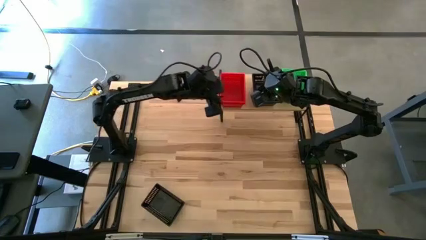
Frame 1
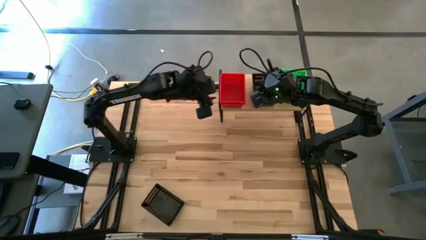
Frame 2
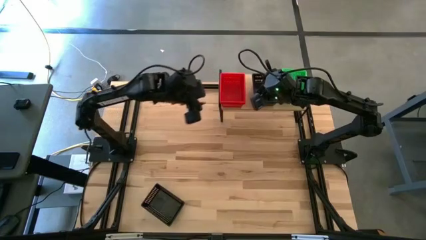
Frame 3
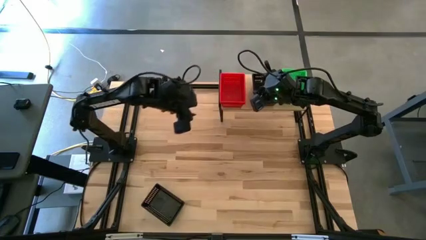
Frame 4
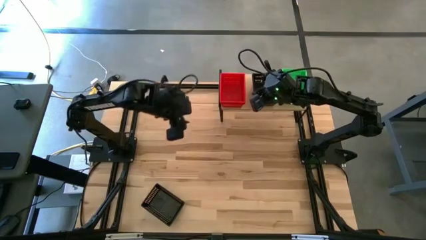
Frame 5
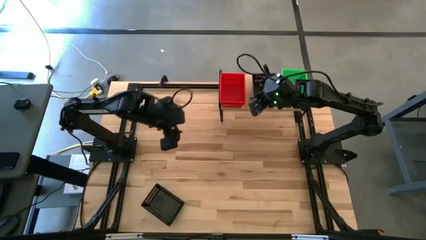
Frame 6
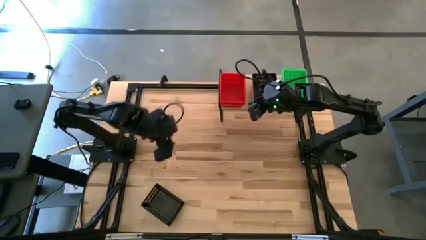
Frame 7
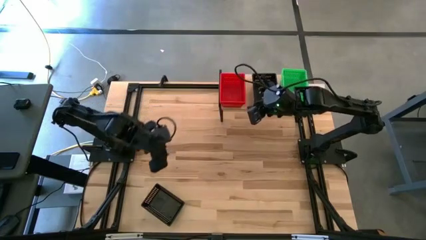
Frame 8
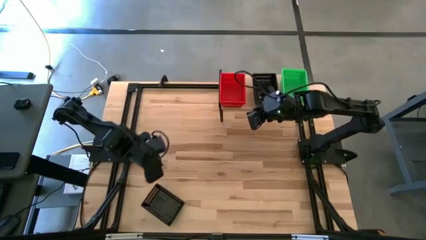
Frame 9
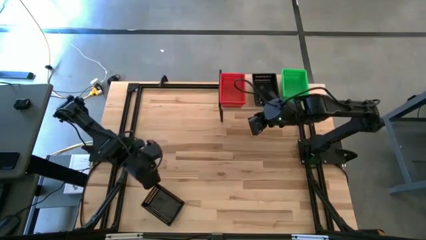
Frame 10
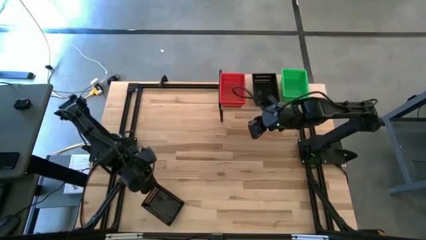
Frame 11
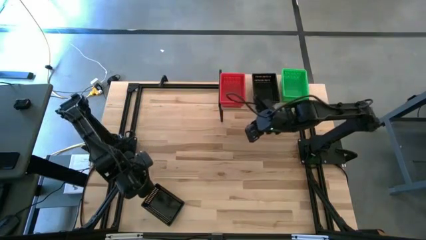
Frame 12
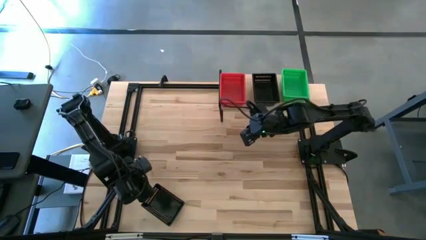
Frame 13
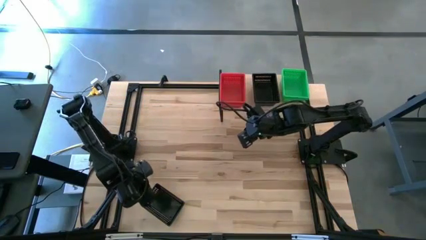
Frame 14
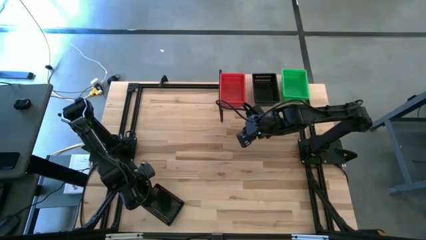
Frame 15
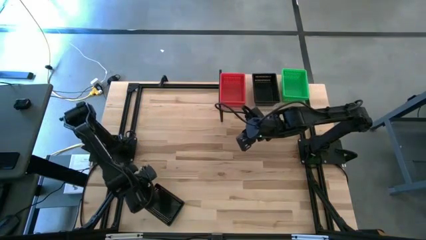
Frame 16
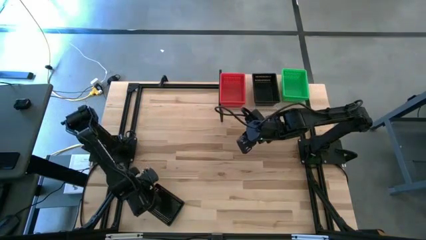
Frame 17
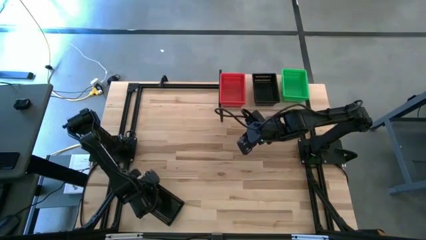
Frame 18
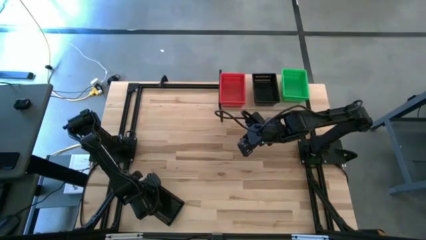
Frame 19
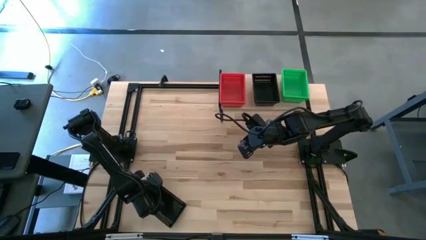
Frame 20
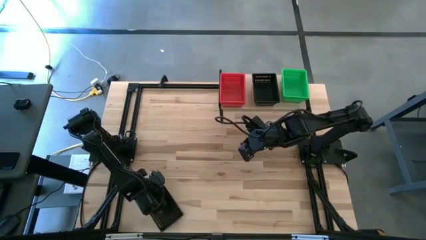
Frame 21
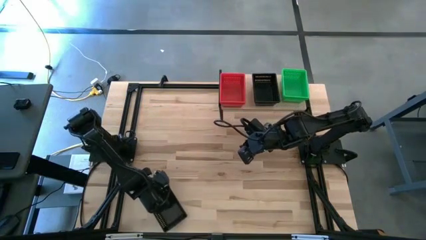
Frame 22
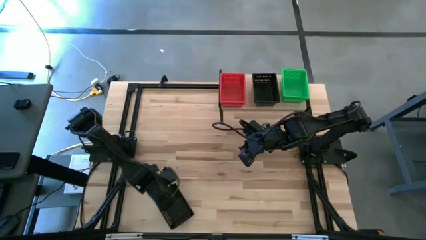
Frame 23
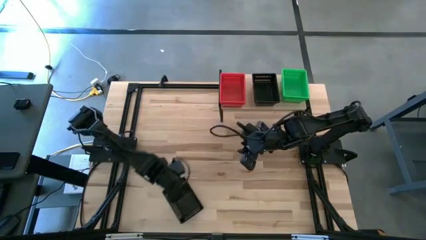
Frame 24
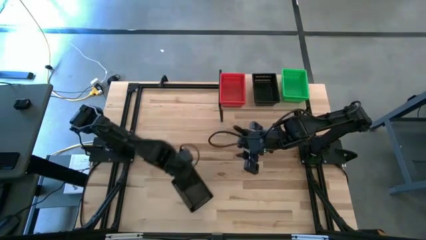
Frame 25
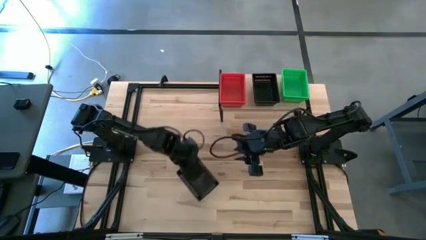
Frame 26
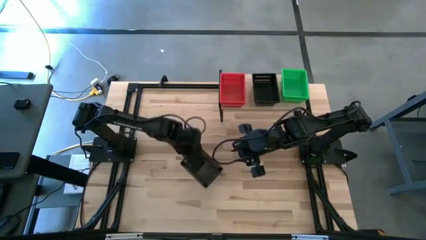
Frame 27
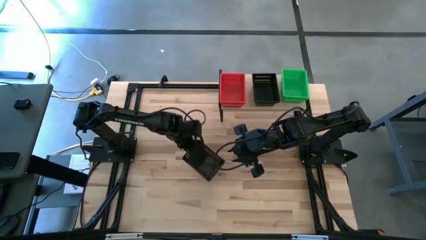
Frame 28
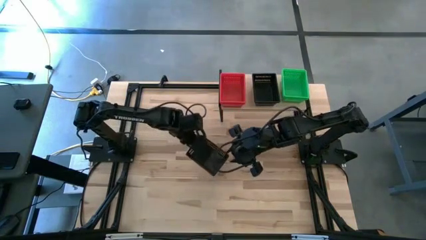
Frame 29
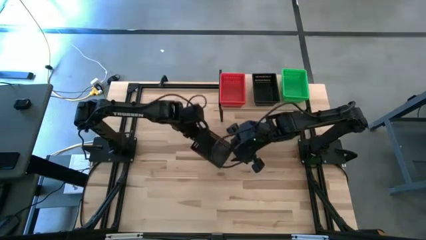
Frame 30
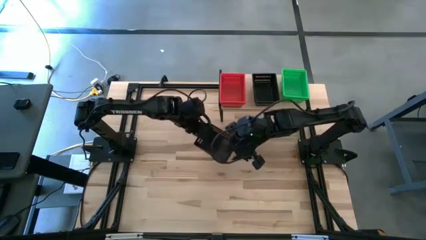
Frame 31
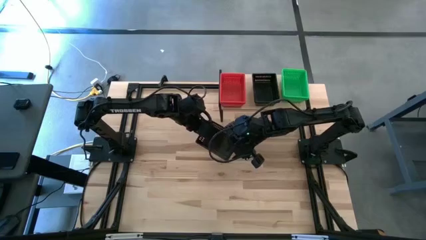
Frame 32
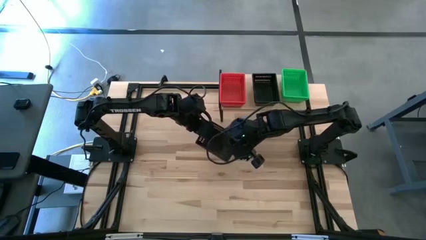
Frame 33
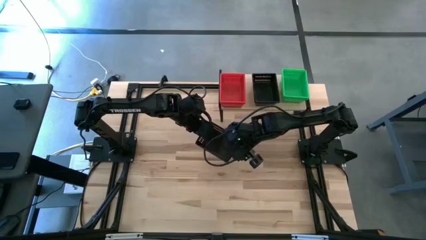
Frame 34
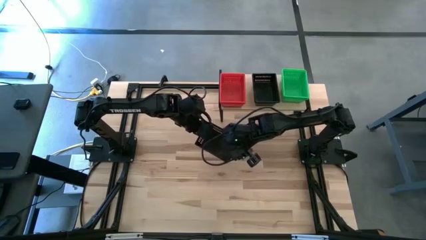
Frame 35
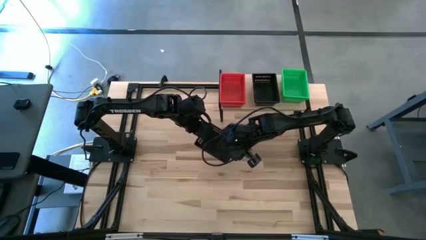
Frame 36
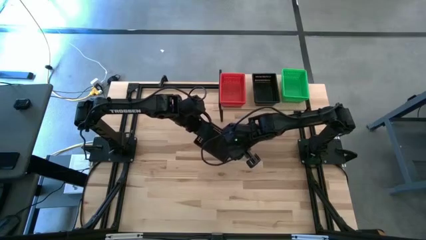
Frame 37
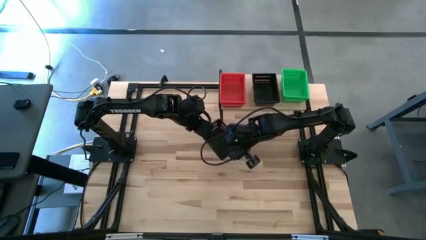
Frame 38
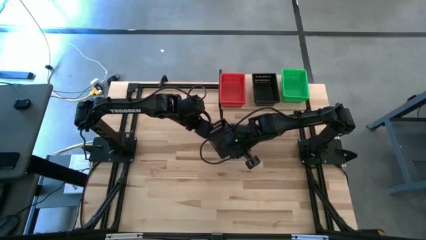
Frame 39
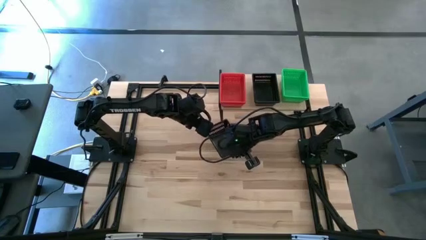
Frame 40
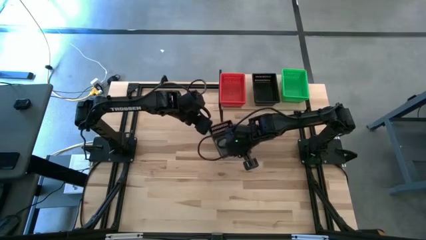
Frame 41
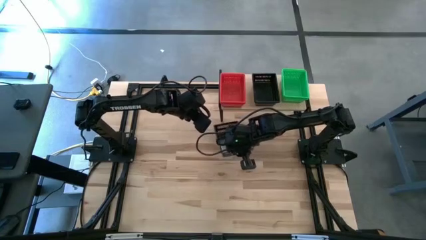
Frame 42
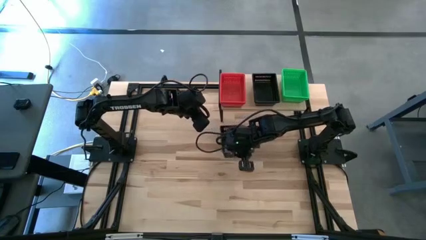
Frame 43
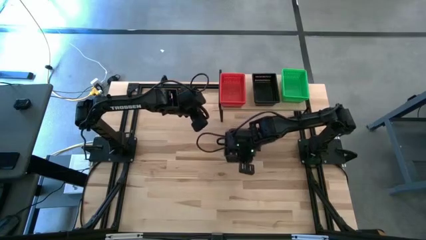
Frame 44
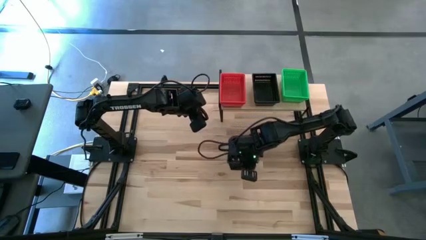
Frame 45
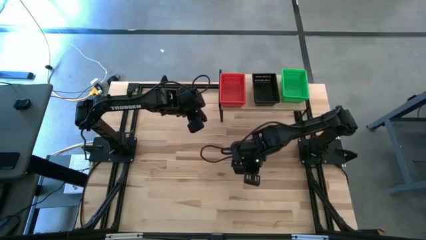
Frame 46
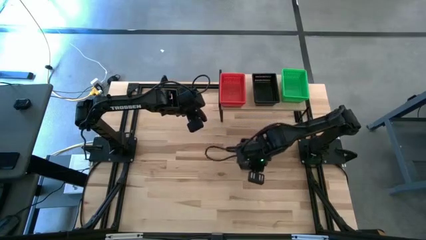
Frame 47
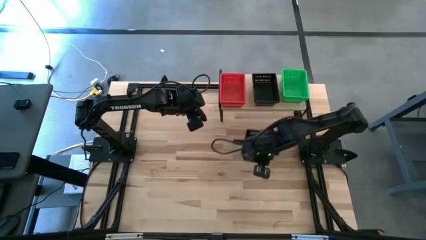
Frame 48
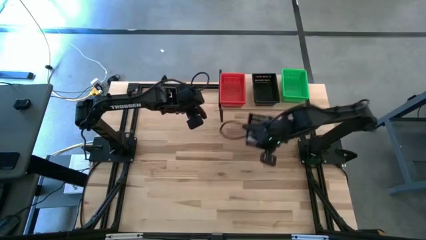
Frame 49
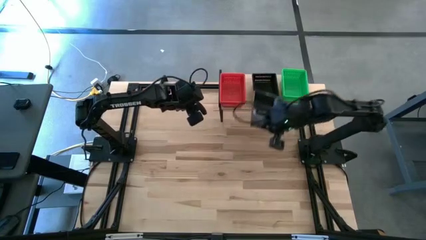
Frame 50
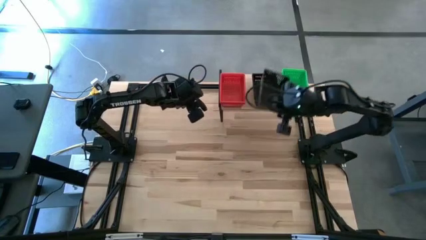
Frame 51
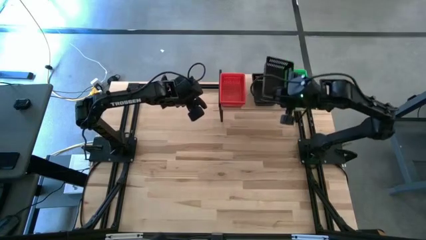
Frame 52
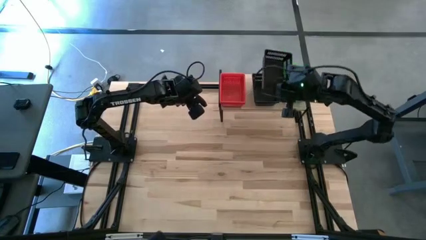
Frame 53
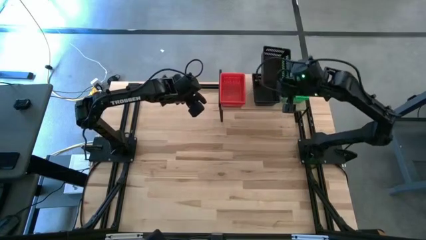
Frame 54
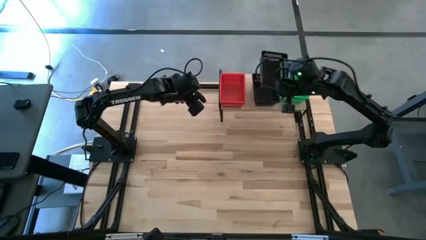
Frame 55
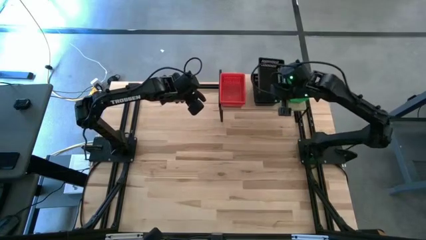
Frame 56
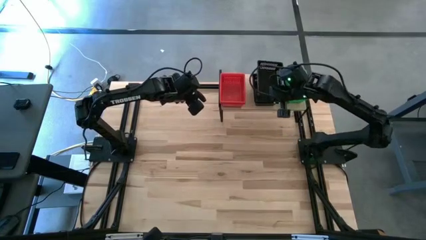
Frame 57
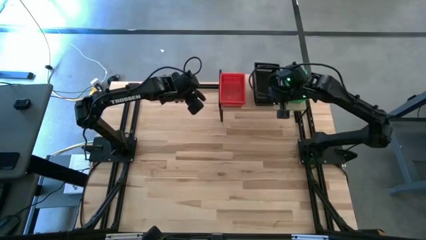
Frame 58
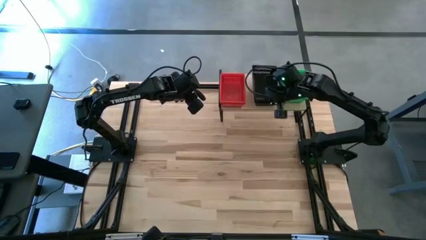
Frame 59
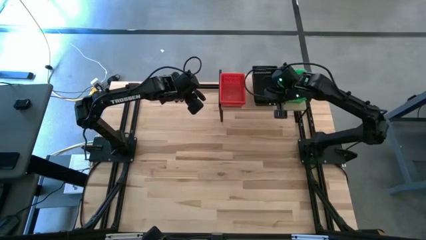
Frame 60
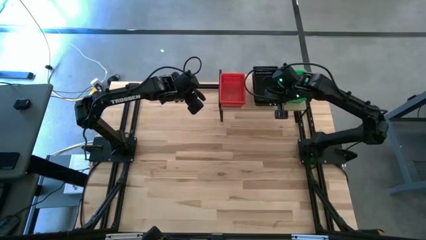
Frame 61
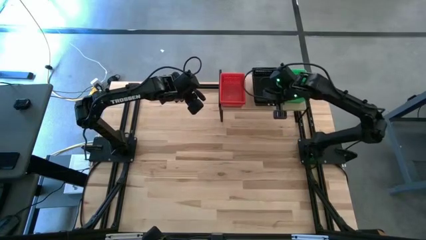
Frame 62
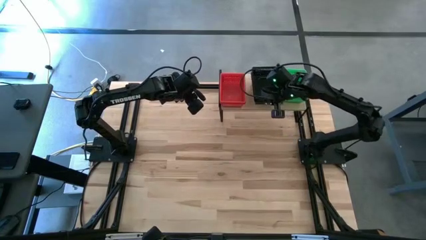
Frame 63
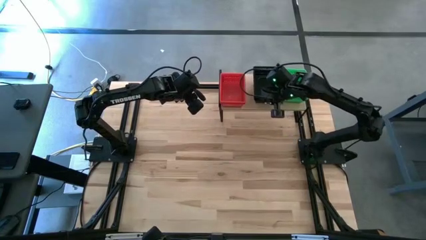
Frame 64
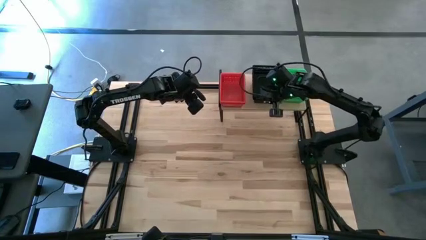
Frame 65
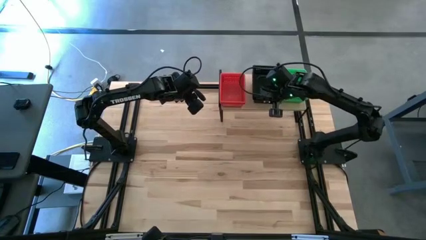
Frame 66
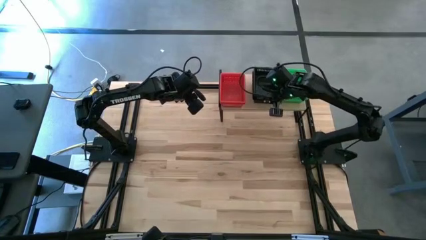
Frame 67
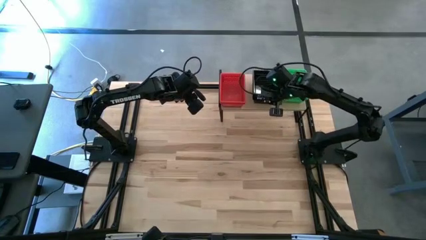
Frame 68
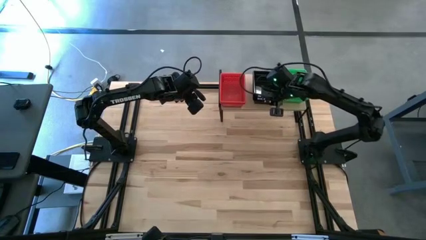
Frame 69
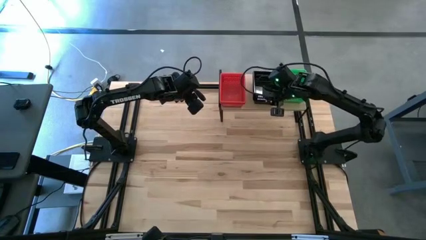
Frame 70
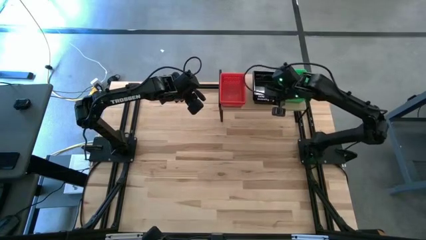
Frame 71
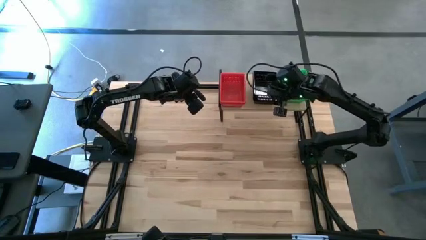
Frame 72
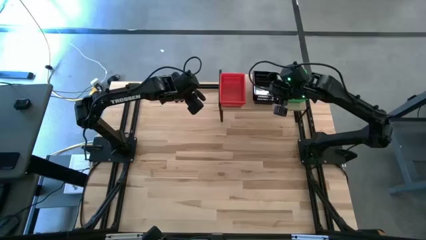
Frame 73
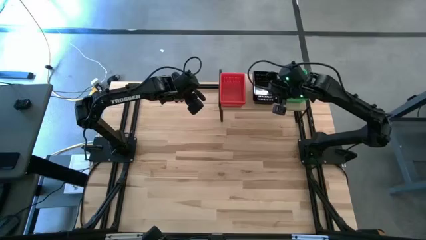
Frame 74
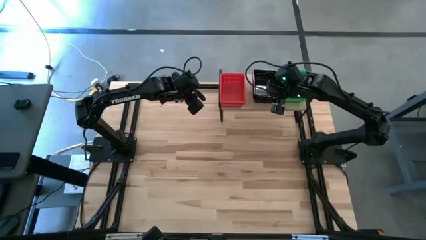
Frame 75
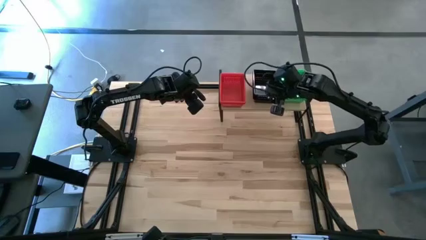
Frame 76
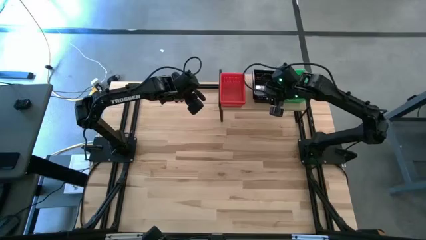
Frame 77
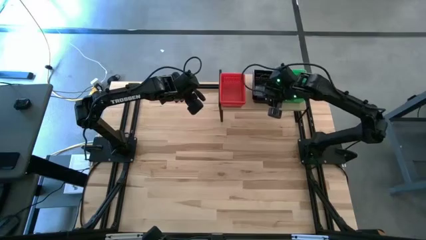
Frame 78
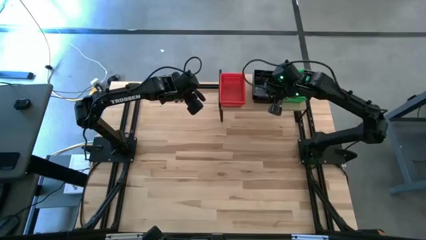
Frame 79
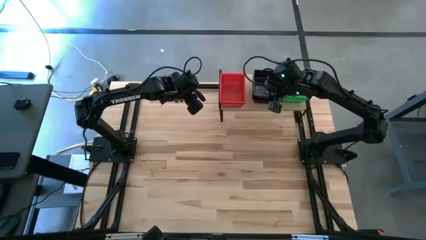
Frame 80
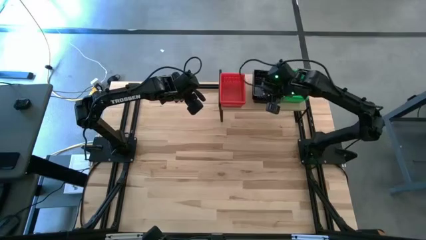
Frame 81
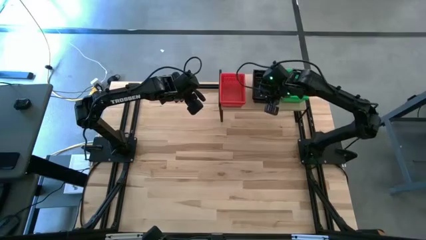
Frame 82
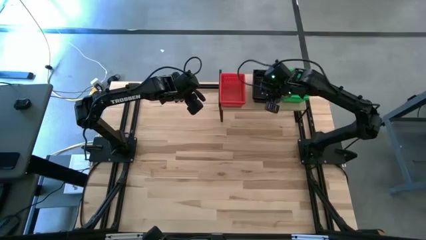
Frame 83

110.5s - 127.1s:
Task: Stack baskets on shelf by color
Stack the black basket on top of the other black baskets on the shelf

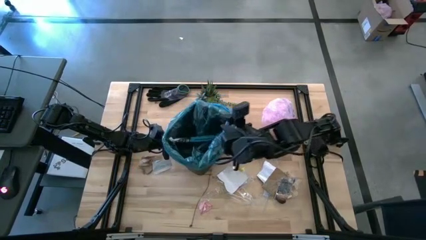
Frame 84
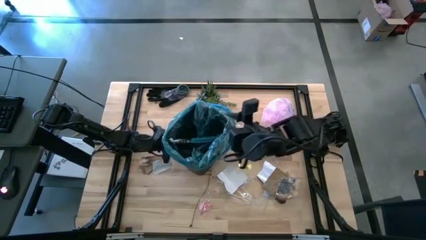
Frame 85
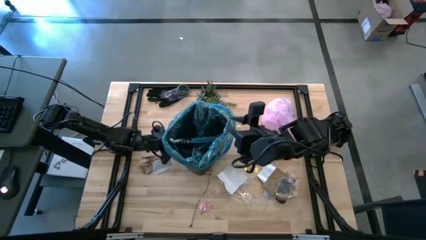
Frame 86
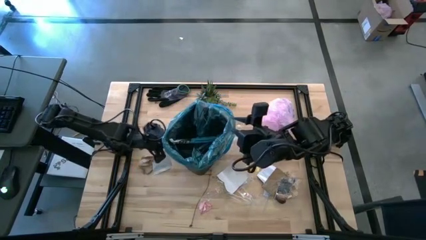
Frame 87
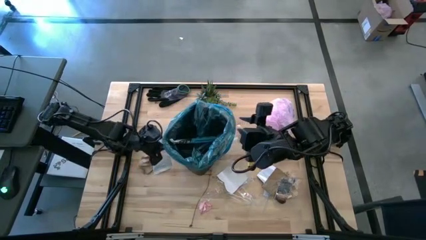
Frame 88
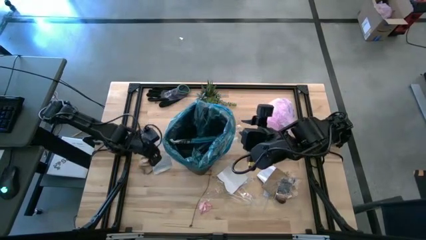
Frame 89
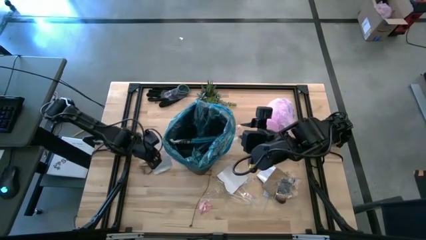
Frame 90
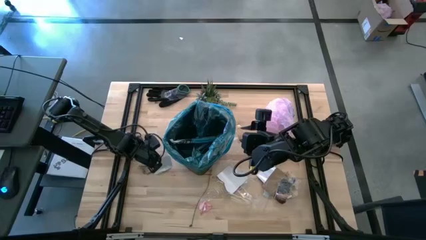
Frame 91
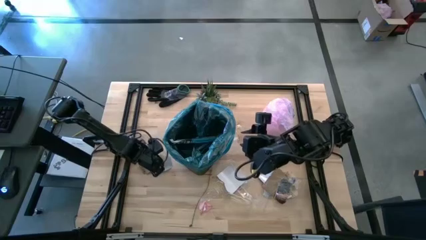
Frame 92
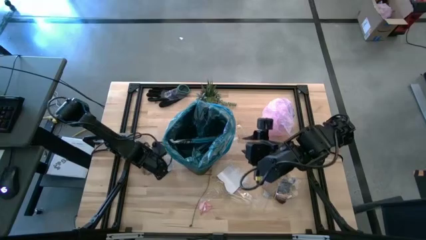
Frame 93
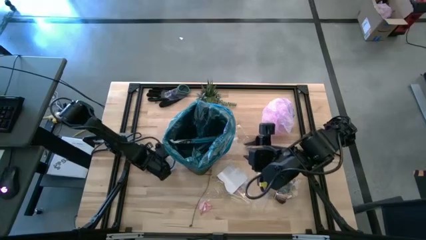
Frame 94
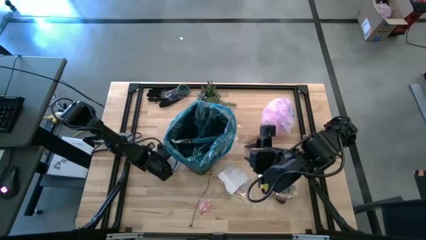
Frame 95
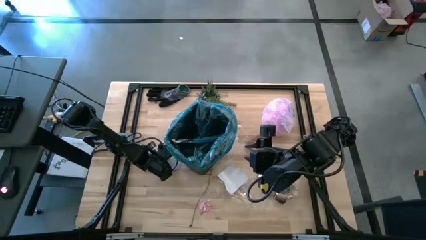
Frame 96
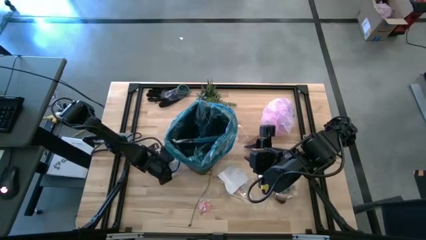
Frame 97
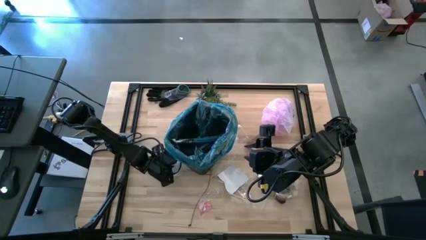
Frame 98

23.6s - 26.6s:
Task: place trash/remove bag and relplace
Put the gray paper into the trash bin
